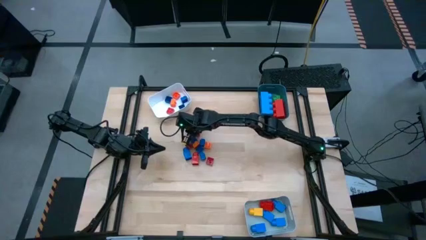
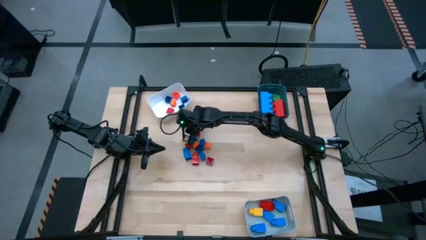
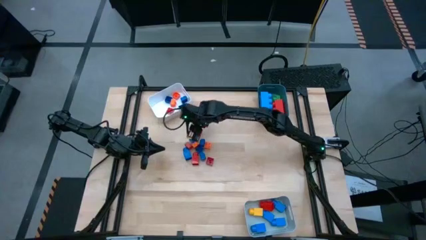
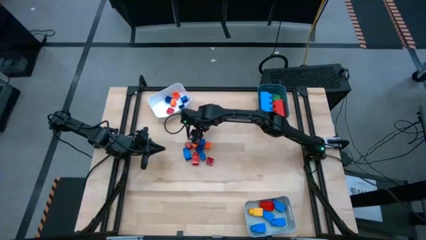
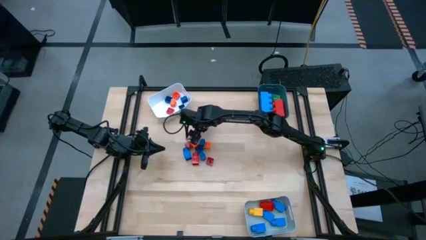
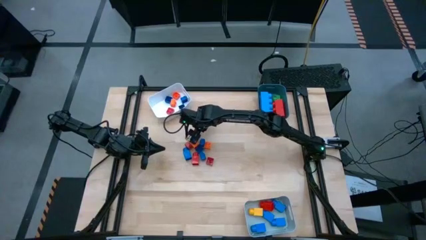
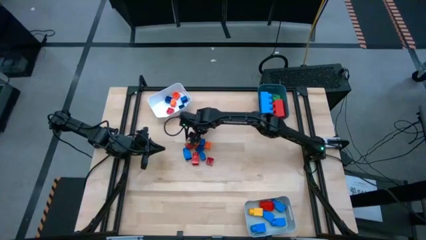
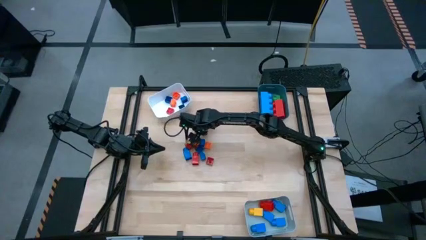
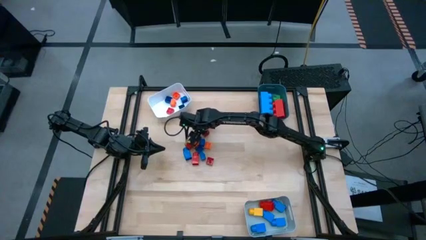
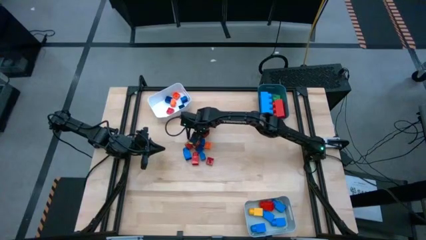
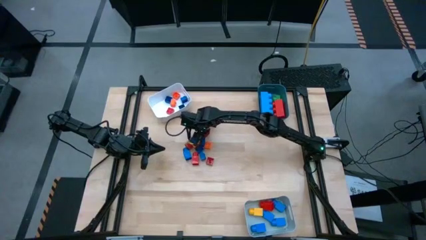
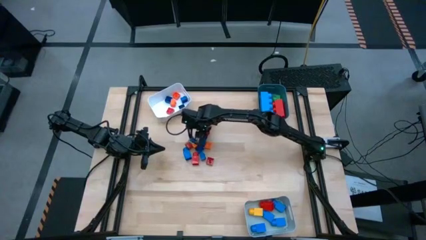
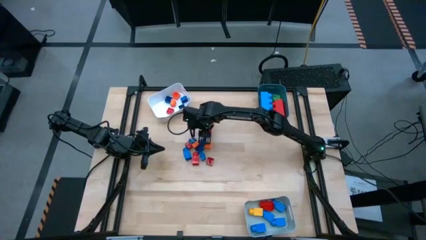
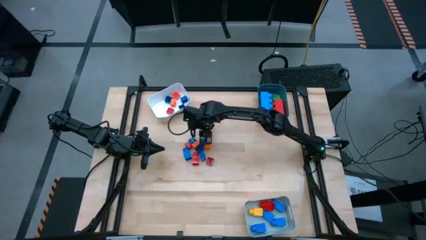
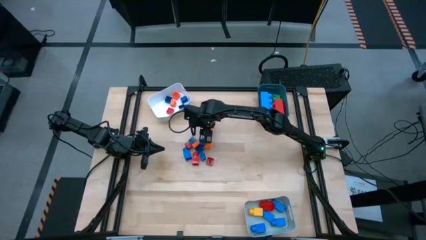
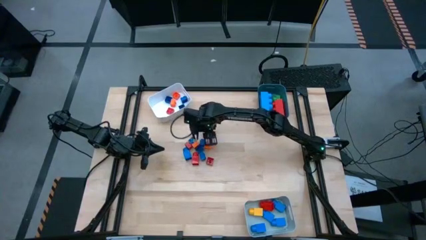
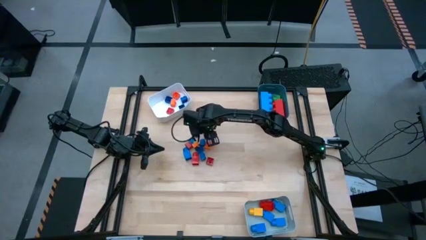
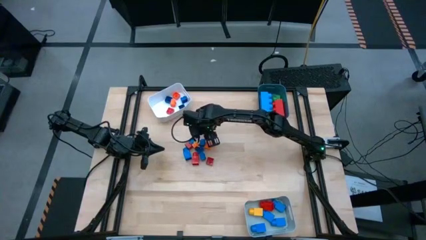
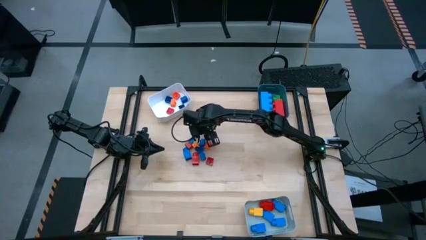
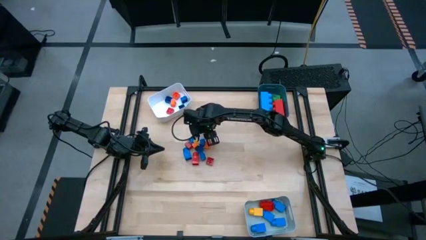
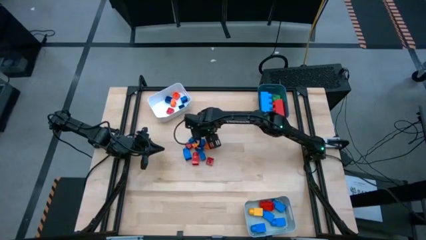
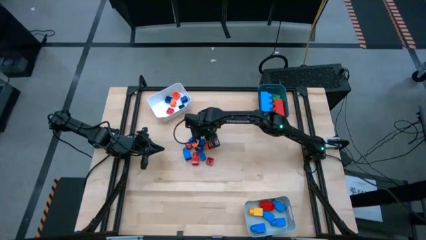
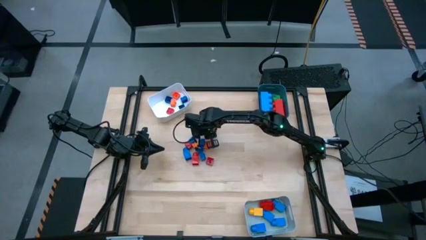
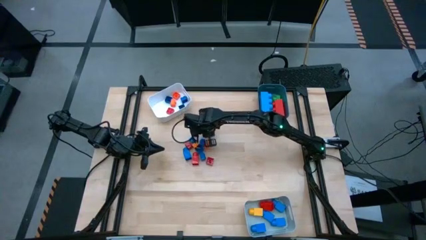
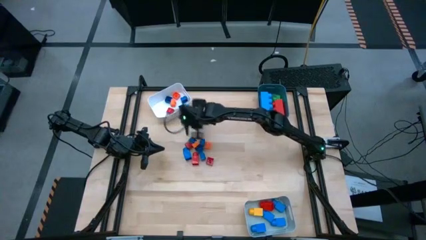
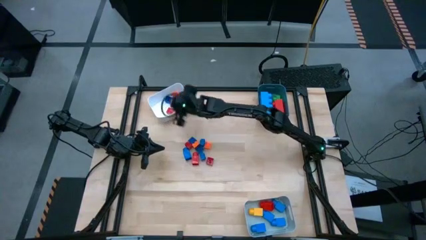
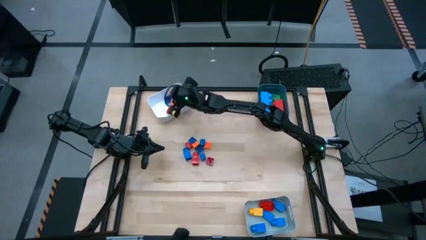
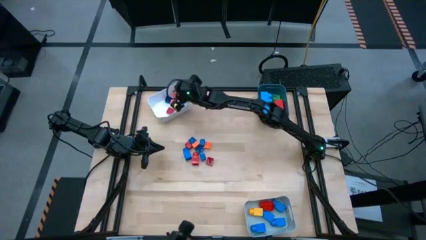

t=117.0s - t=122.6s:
Task: Sort blocks by size
Put the small 4 stud red game piece into the white bin

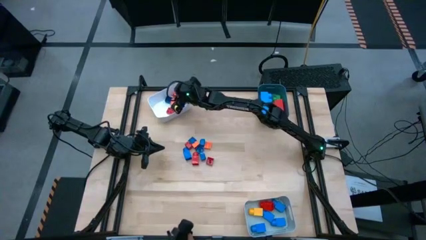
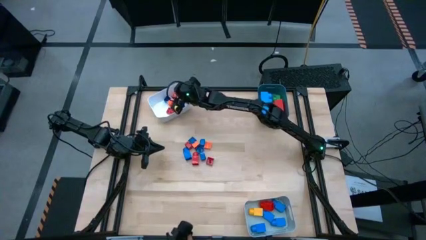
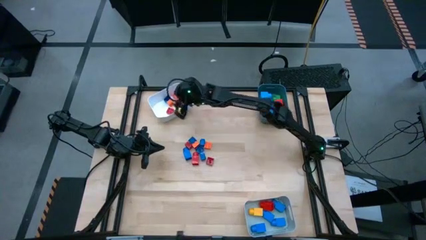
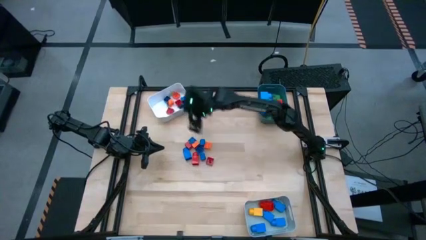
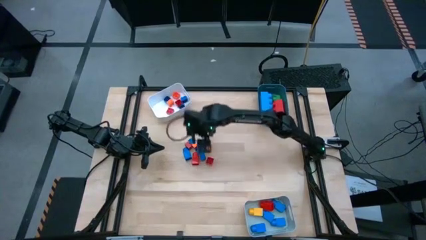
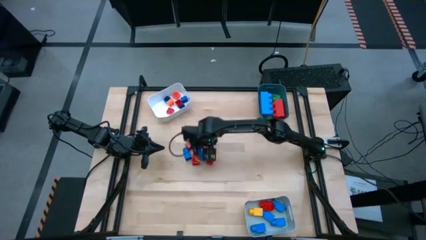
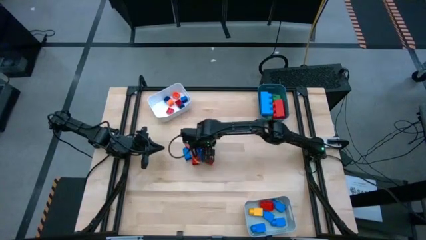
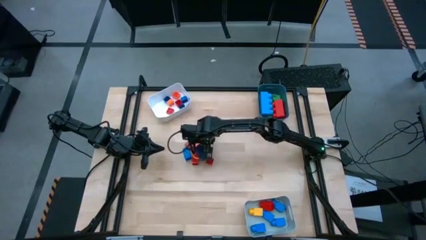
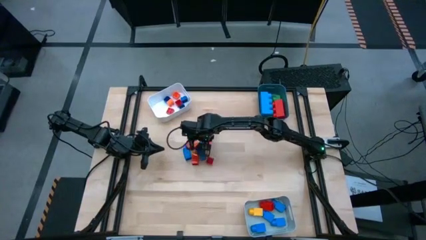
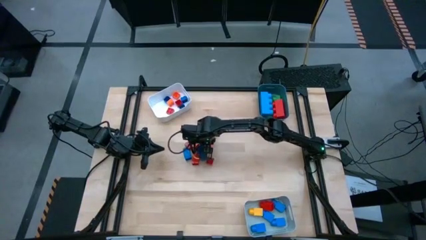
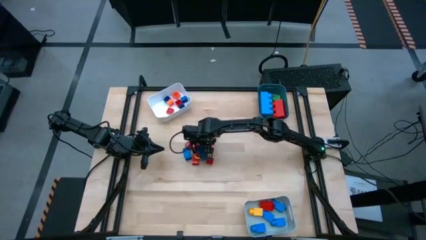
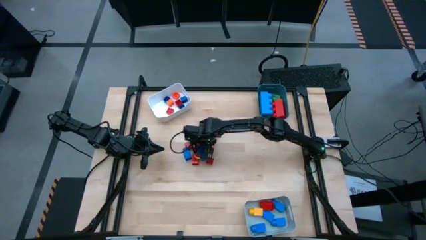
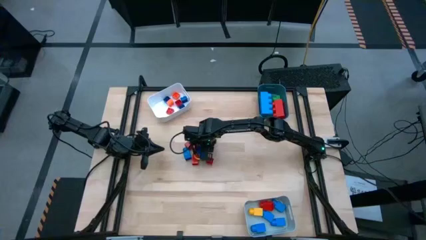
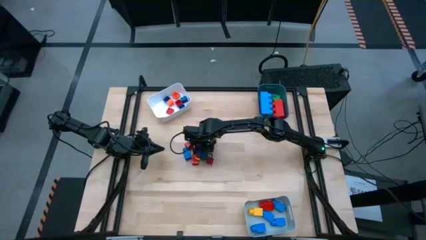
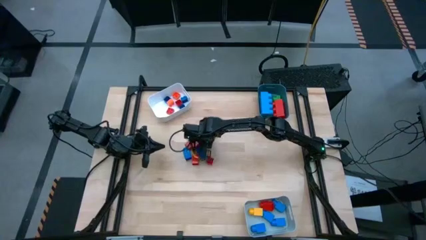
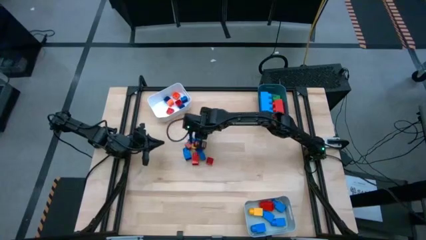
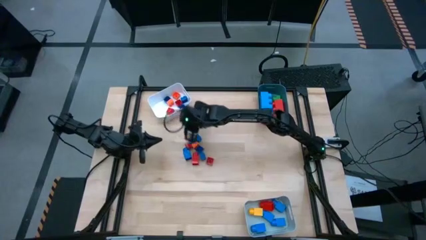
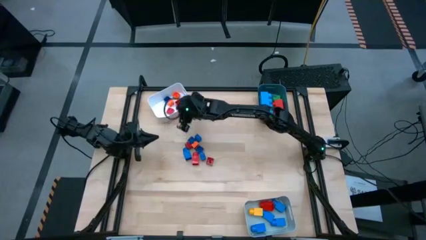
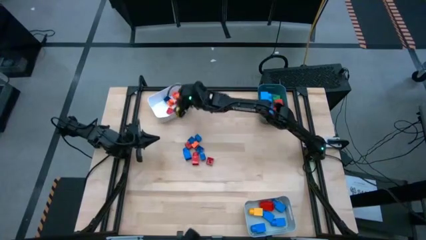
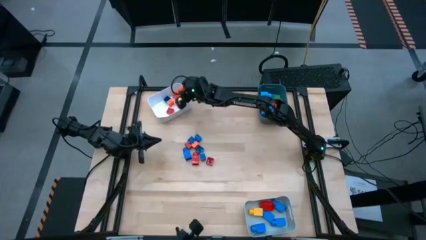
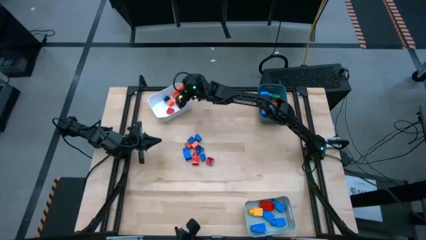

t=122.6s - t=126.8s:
Put the small 4 stud orange game piece into the white bin

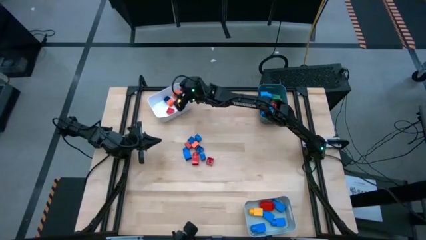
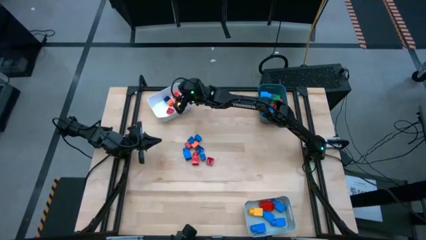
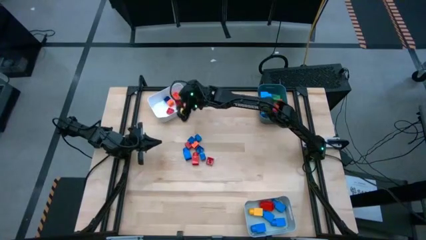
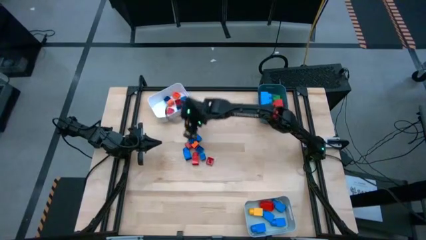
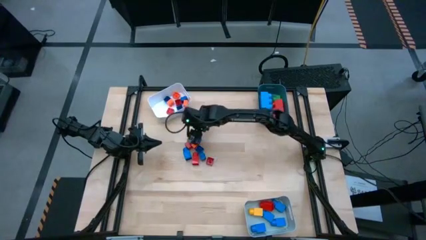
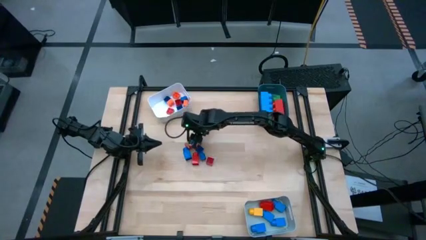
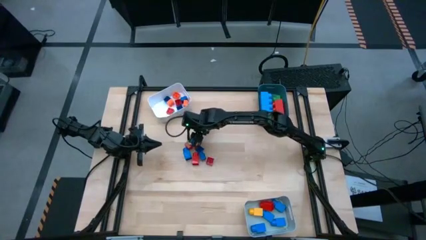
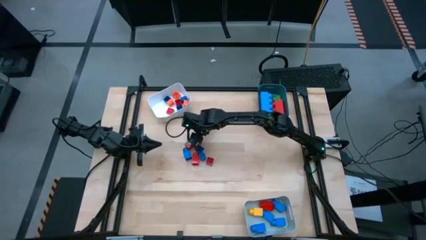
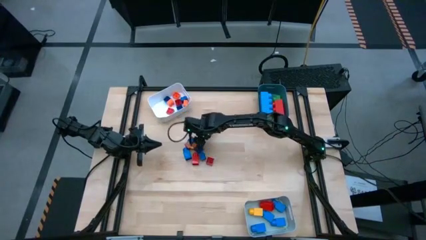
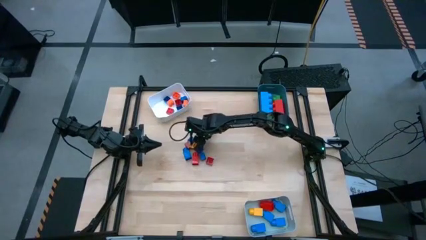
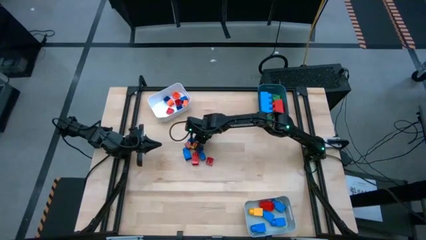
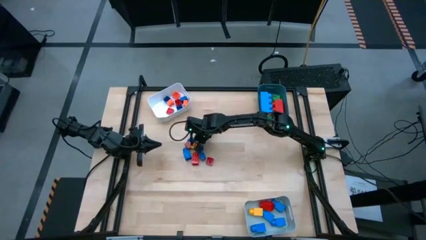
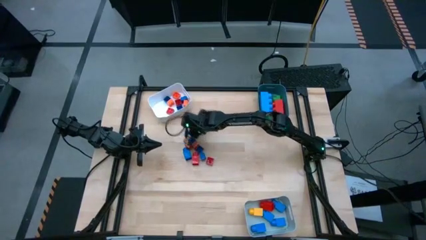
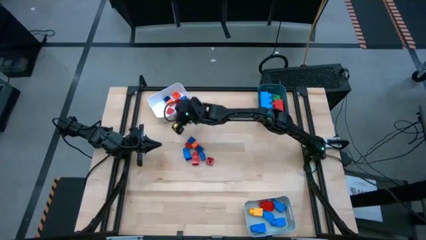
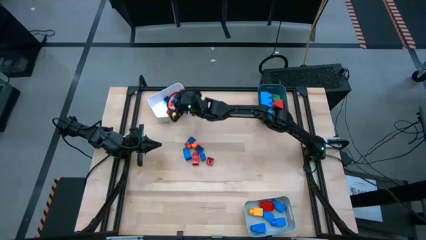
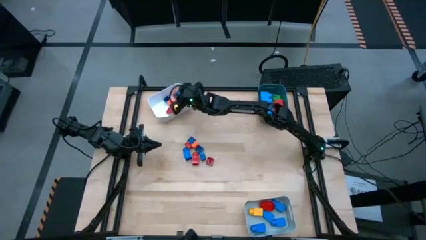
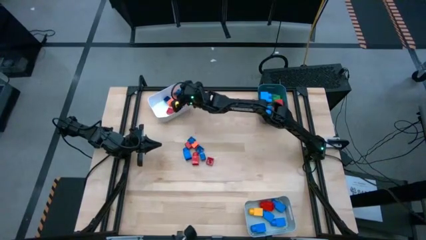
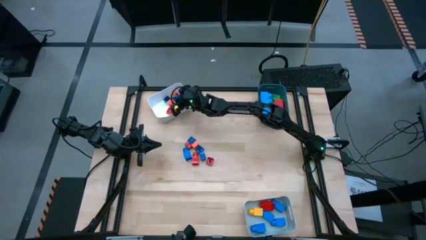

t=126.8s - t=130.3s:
Put the small 4 stud blue game piece into the white bin

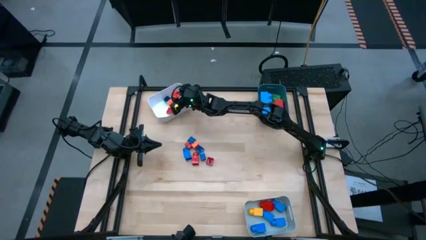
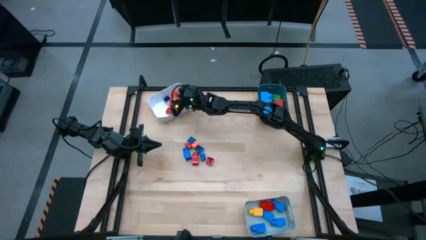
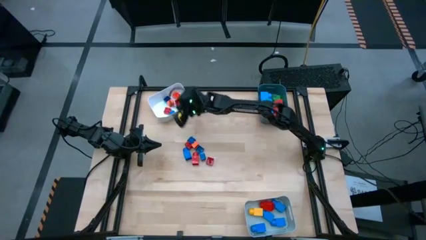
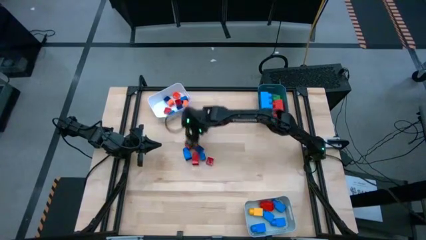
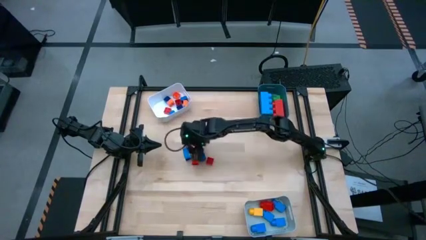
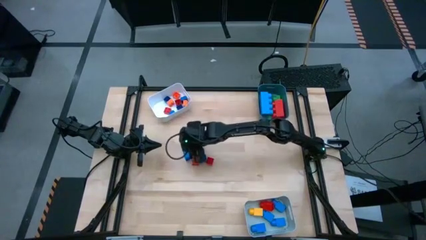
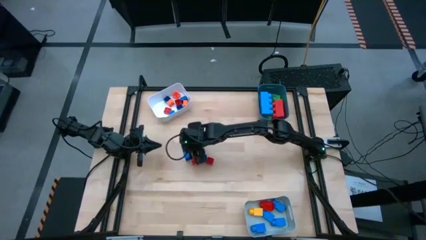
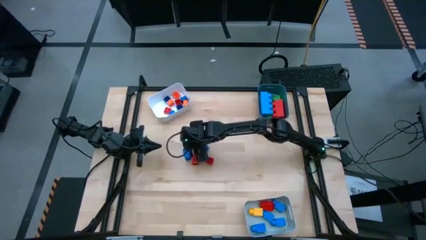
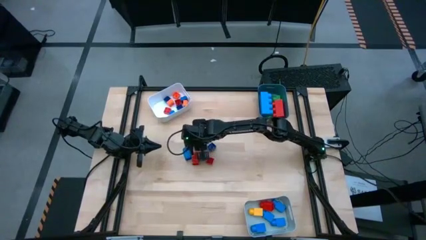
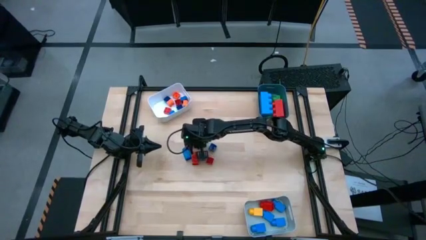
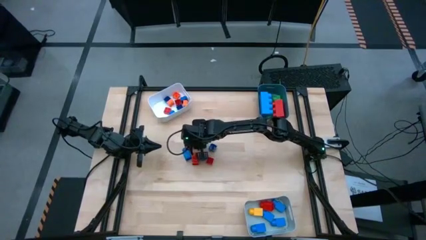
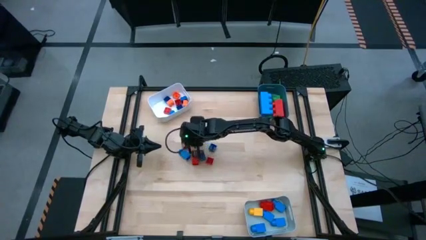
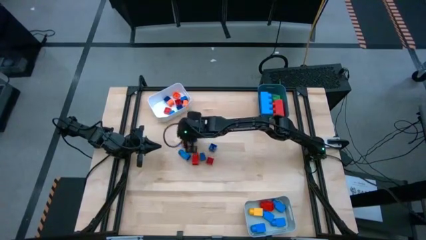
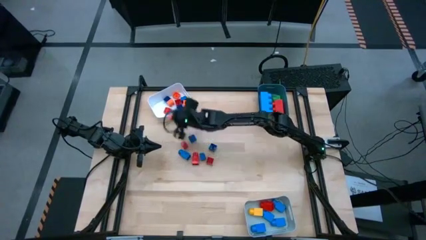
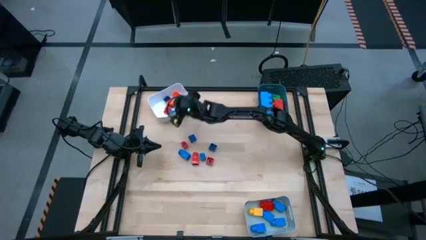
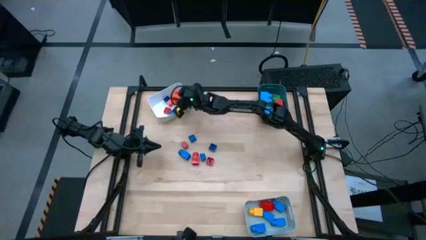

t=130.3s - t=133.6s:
Put the small 4 stud orange game piece into the white bin
